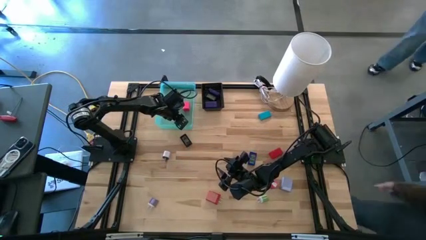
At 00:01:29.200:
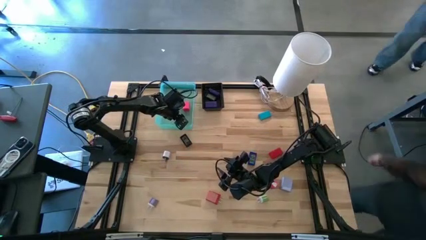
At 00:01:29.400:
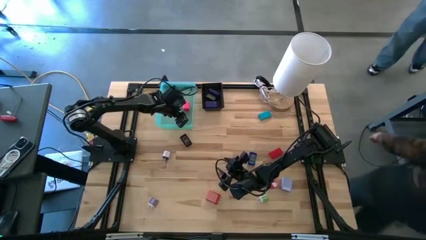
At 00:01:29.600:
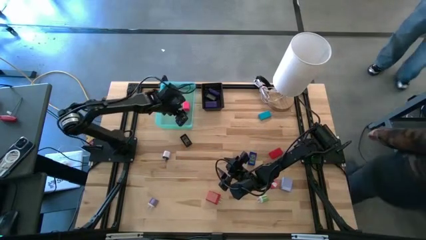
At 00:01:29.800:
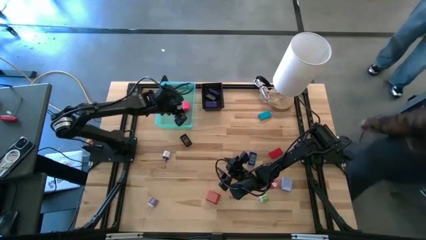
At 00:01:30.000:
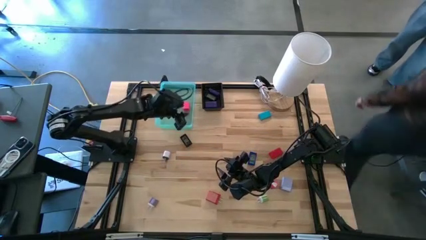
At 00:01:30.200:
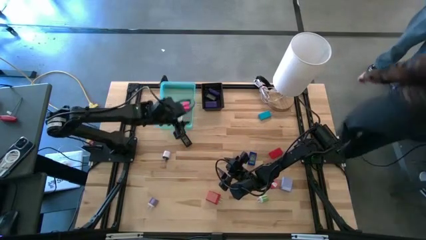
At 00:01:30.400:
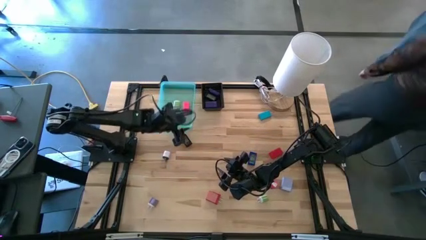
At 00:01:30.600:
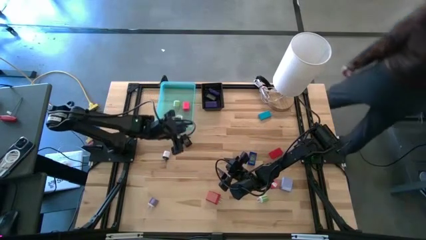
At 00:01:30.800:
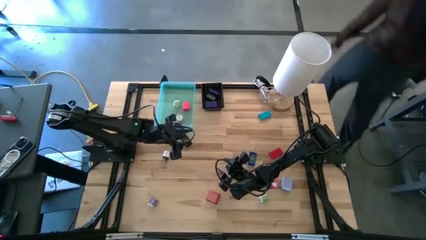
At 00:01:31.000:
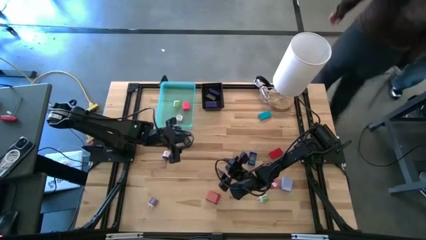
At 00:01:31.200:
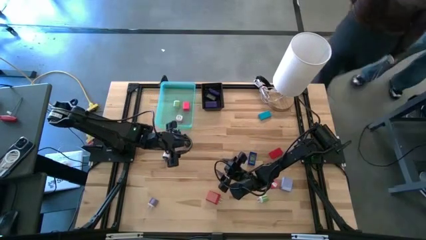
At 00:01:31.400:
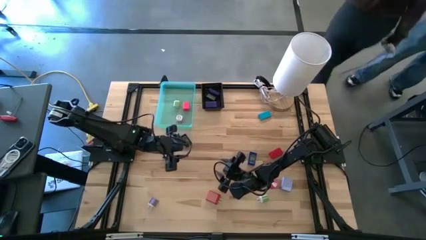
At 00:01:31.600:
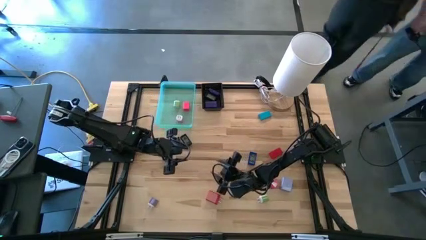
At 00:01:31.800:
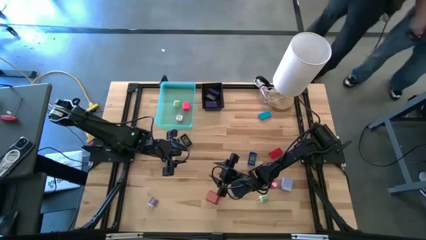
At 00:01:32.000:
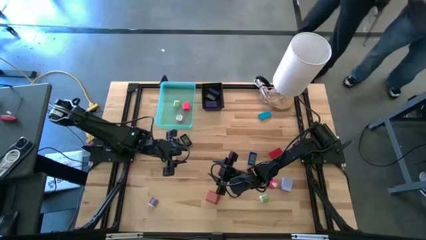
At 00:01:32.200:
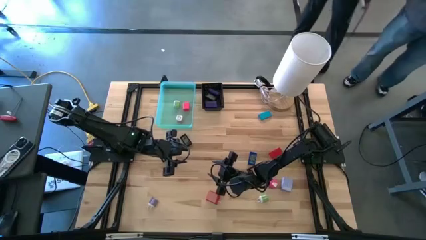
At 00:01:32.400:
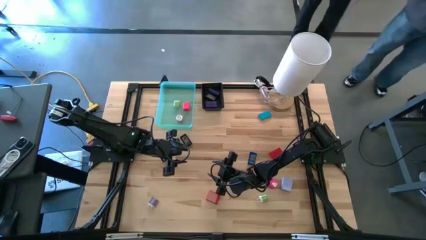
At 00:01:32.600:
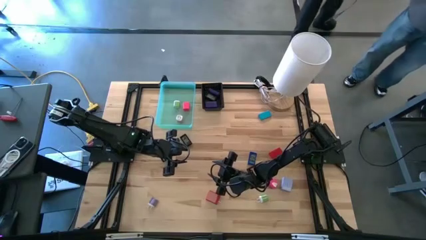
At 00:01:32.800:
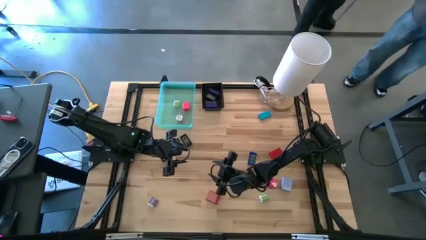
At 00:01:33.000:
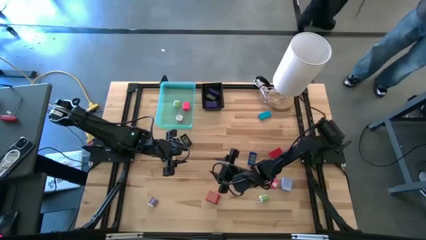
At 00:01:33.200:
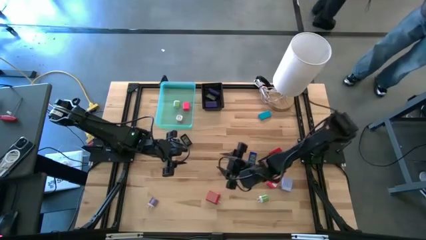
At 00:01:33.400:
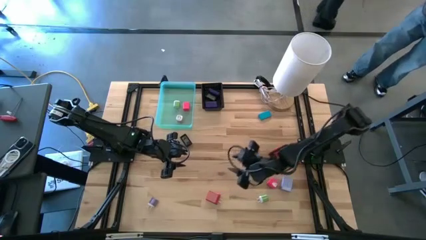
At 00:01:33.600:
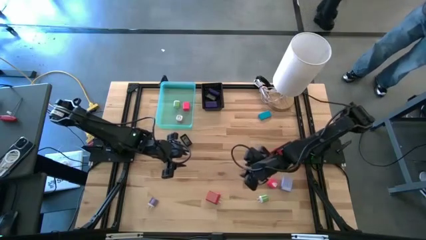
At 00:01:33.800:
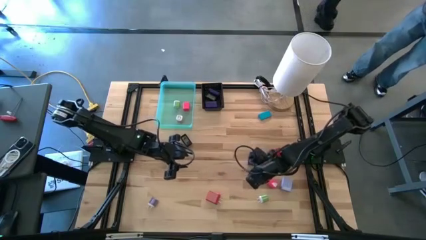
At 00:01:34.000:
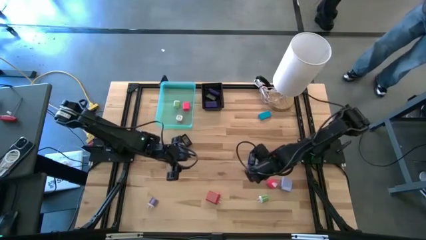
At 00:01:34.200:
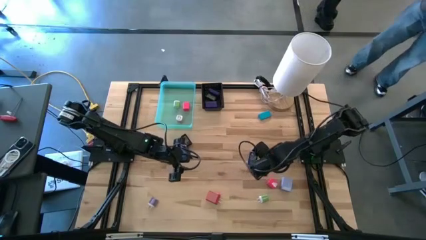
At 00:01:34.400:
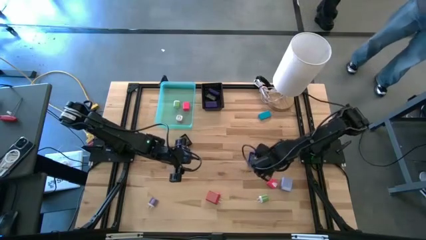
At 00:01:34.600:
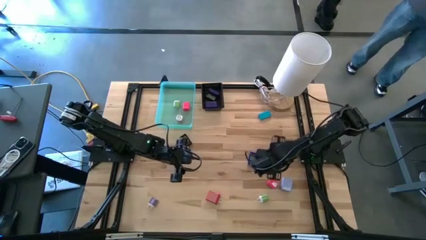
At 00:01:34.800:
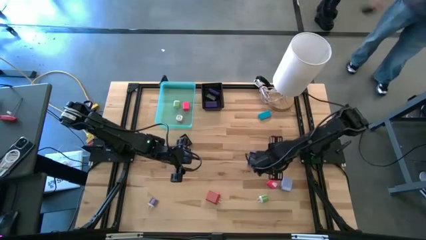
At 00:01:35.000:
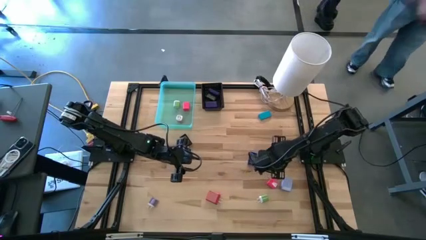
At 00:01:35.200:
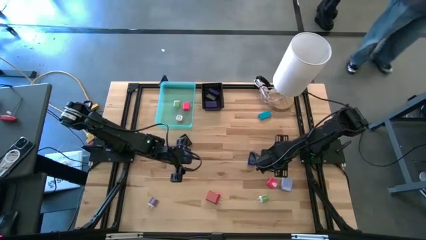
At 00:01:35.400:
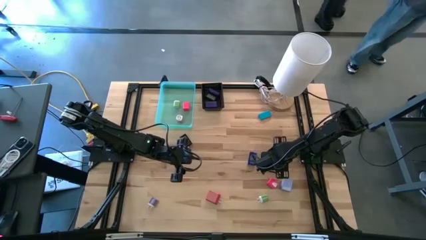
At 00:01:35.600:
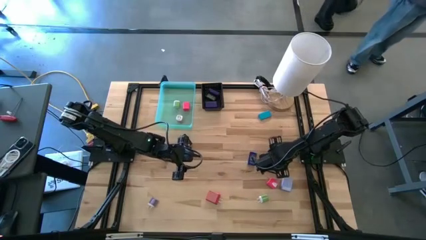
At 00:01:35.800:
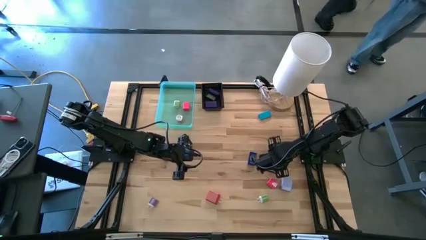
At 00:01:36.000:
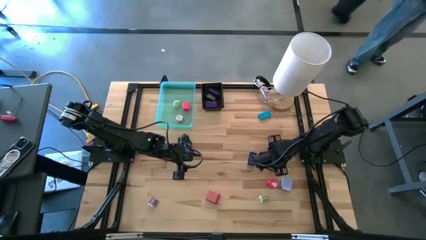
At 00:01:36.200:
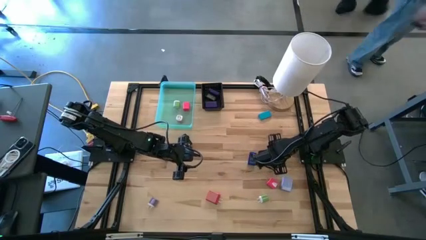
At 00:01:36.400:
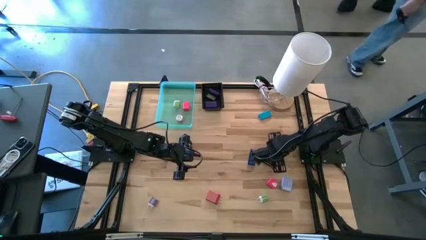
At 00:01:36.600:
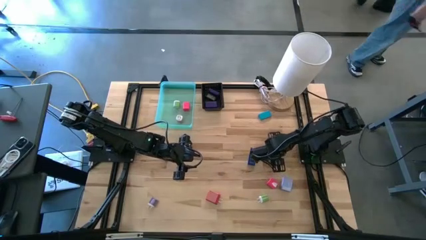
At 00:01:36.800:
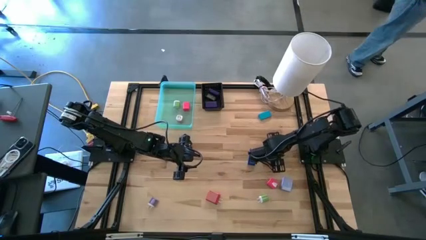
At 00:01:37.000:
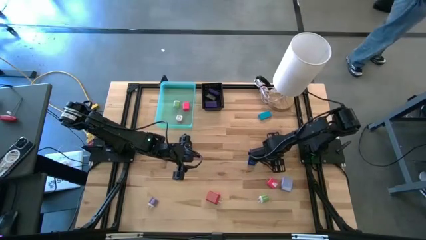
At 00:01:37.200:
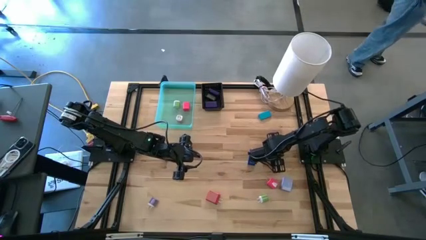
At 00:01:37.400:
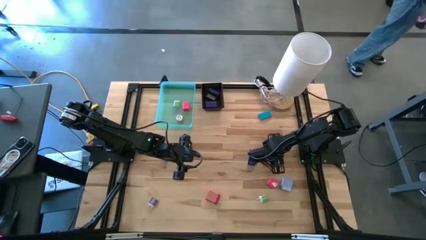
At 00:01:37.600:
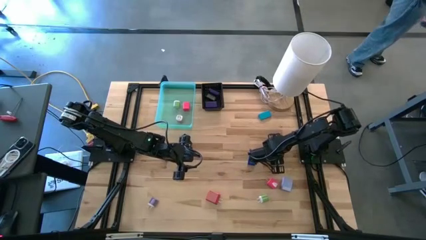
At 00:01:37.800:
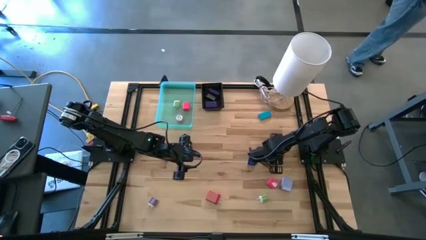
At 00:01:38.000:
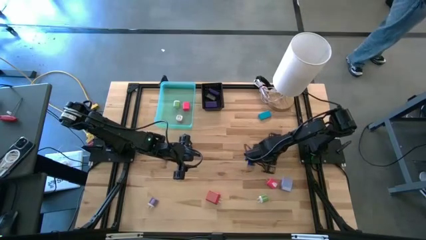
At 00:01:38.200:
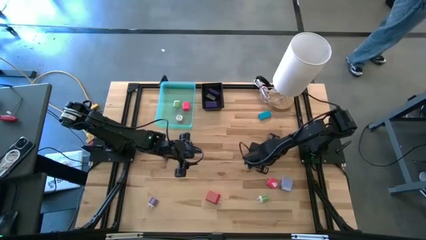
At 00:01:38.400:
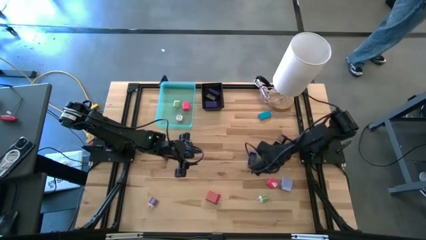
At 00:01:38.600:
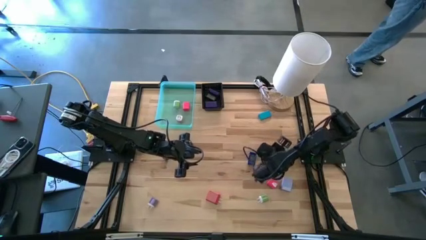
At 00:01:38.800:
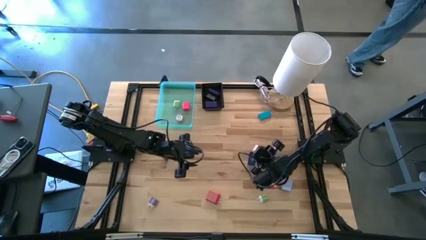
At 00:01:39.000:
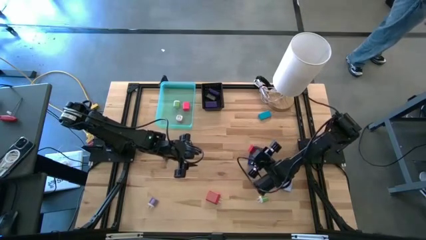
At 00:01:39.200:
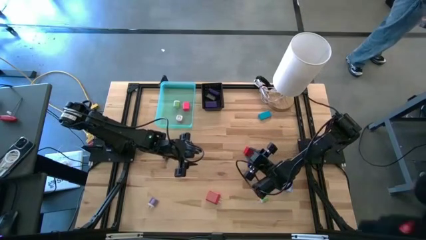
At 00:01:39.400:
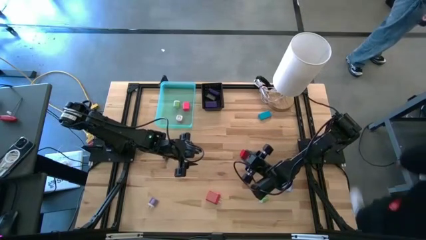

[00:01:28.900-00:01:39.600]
Task: Pick & Place Office items
Put the red timer into the black bin

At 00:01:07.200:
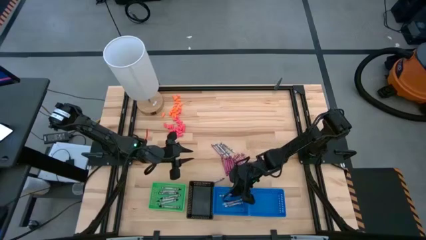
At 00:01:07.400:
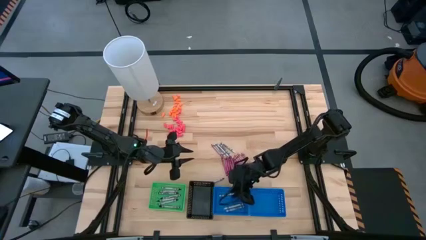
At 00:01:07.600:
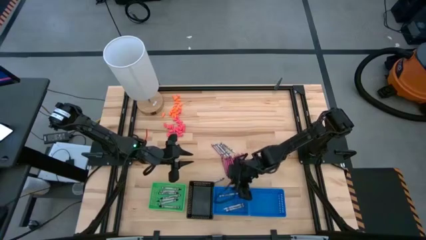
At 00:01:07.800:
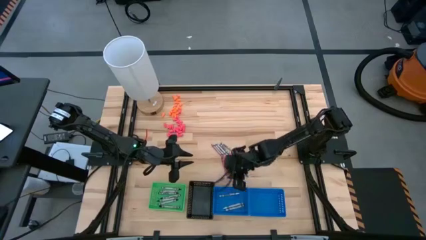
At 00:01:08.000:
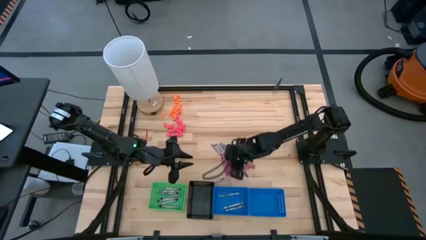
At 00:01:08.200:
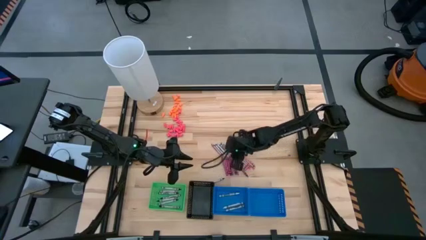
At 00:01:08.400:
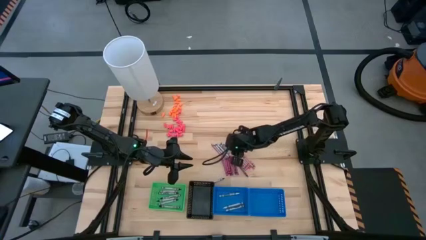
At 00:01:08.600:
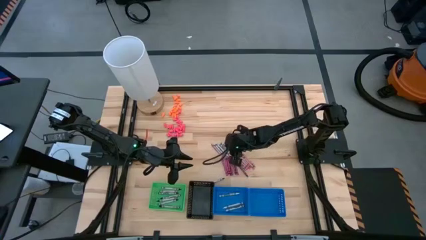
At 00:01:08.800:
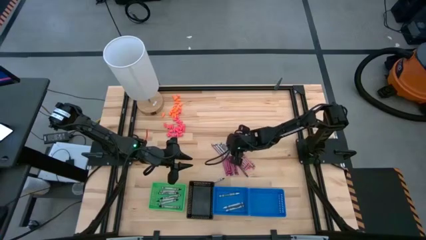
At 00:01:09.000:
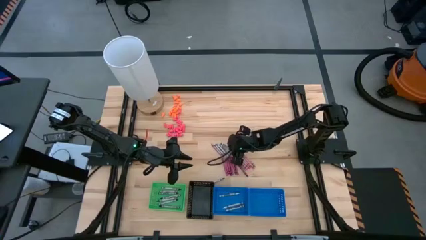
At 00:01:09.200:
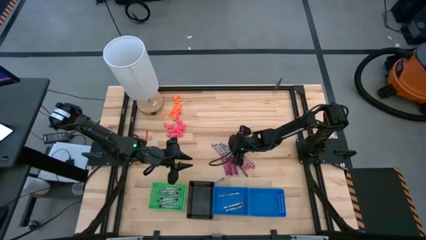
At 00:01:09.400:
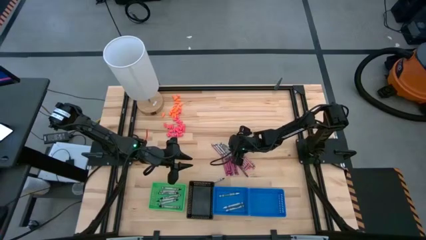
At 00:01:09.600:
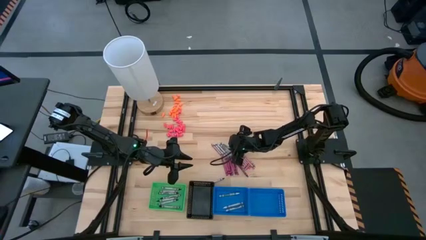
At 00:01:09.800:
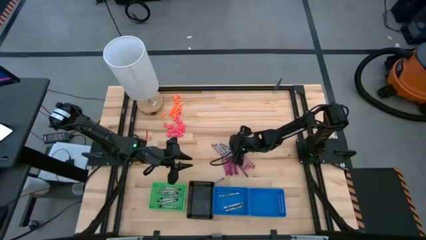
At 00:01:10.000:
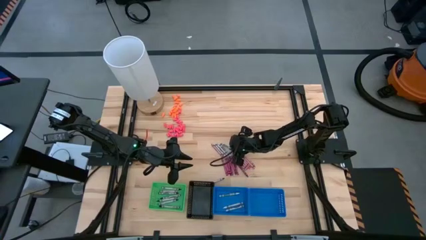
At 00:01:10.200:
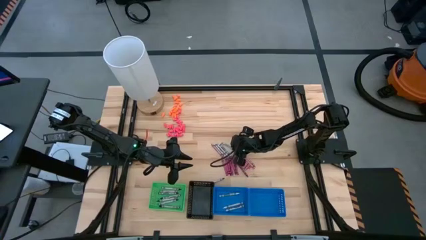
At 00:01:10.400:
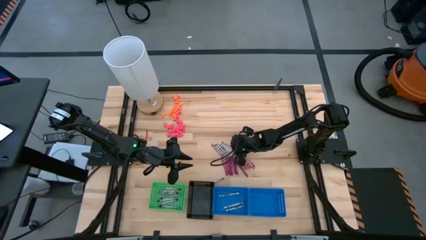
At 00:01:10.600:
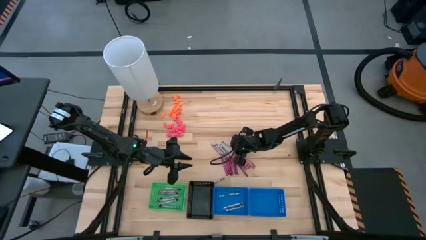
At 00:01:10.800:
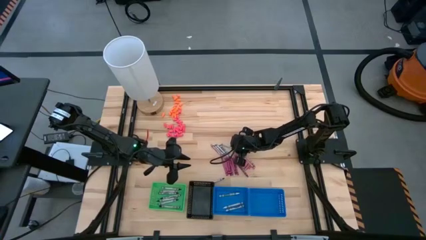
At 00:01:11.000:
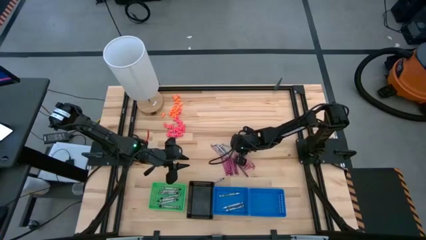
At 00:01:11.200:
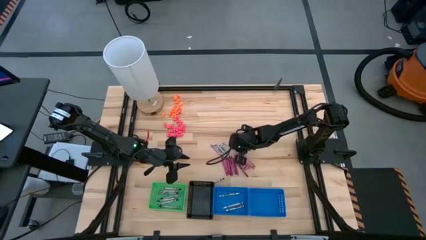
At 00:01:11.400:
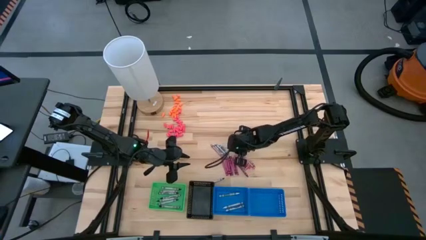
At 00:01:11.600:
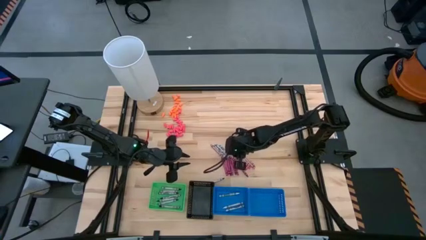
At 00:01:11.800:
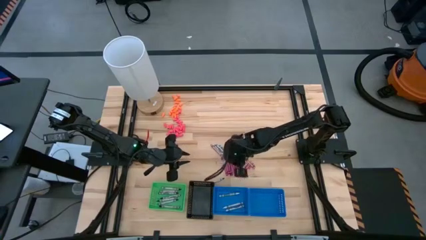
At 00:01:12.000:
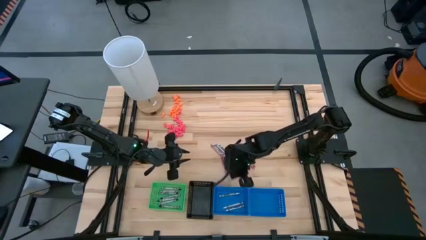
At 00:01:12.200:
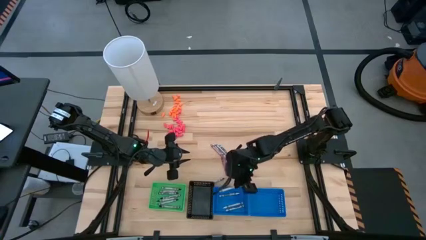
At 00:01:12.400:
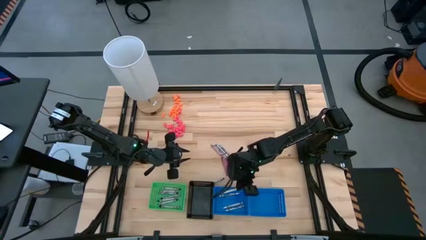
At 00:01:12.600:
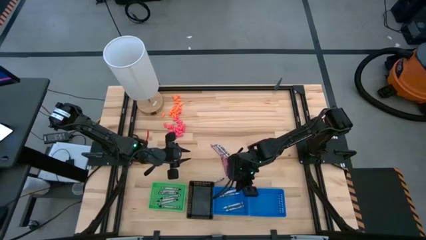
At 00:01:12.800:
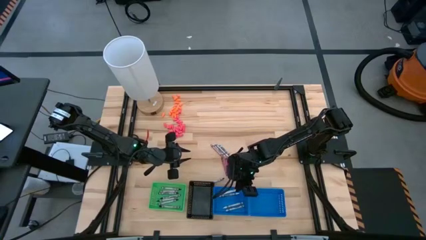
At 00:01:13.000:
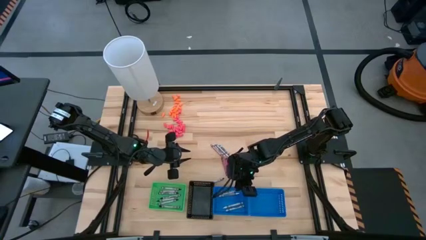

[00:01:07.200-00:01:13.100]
Task: Sort crayons
Put the white crayon into the left blue bin
